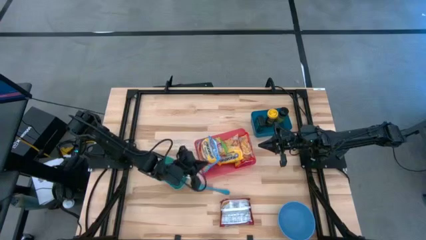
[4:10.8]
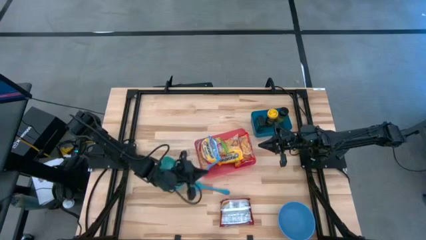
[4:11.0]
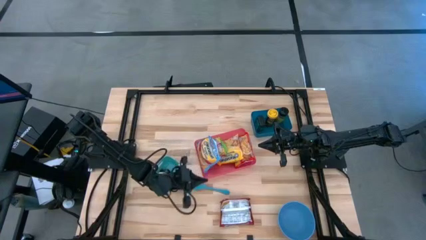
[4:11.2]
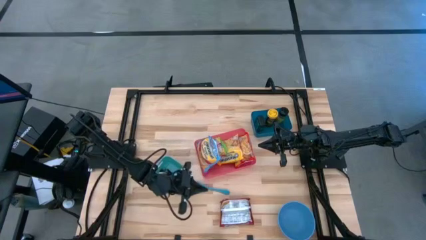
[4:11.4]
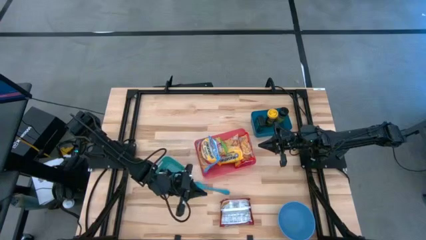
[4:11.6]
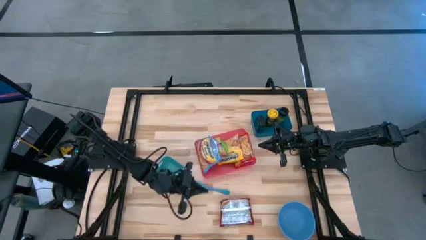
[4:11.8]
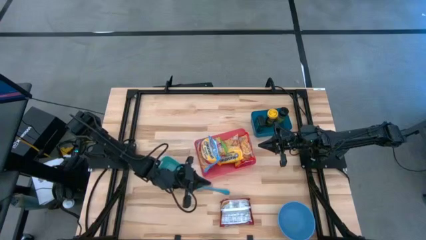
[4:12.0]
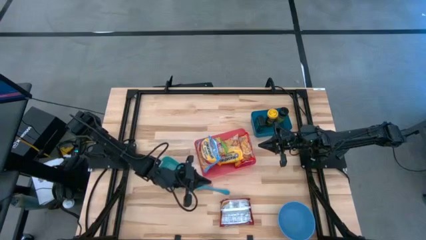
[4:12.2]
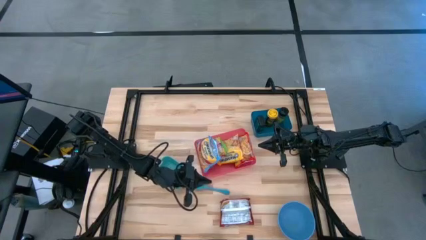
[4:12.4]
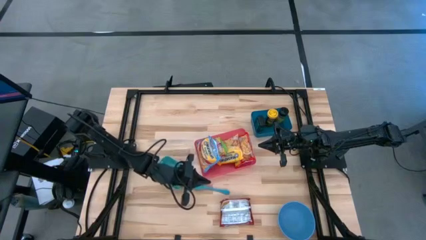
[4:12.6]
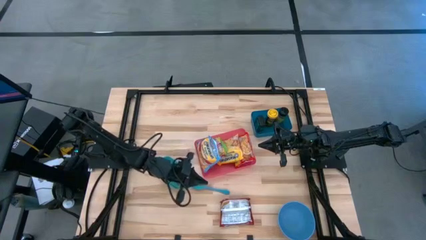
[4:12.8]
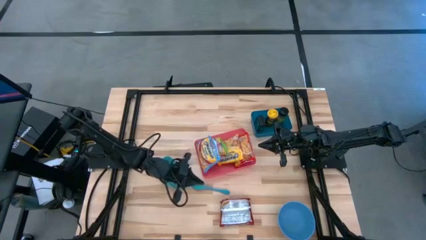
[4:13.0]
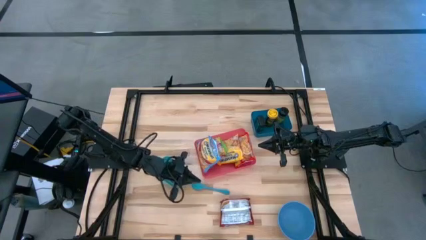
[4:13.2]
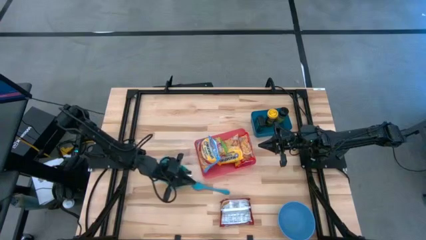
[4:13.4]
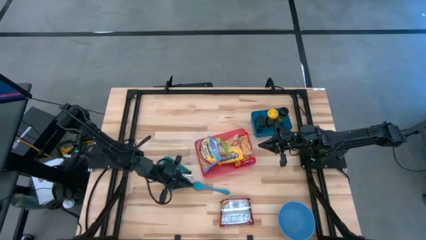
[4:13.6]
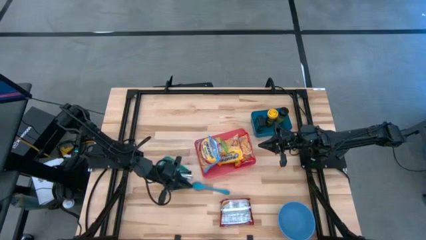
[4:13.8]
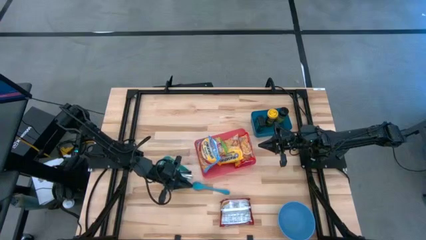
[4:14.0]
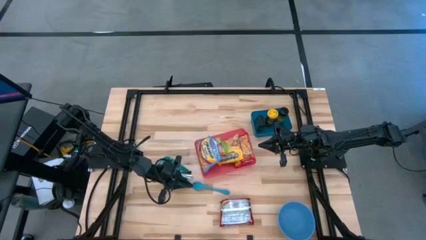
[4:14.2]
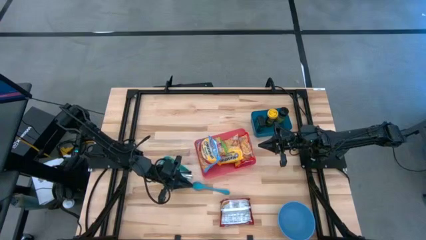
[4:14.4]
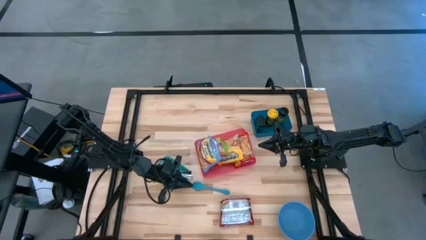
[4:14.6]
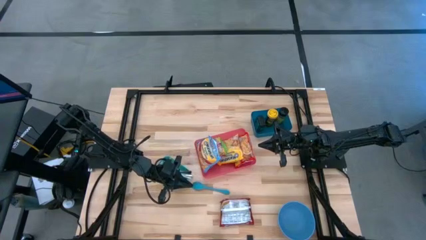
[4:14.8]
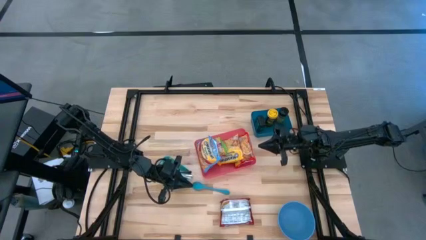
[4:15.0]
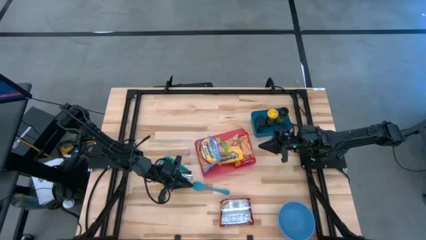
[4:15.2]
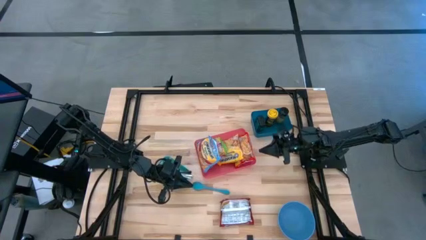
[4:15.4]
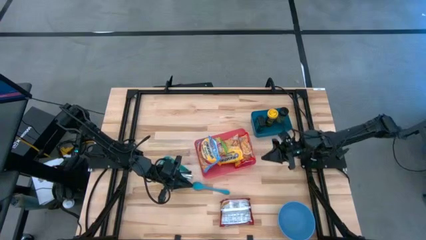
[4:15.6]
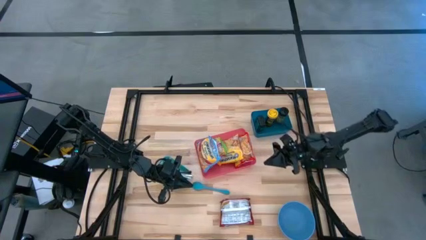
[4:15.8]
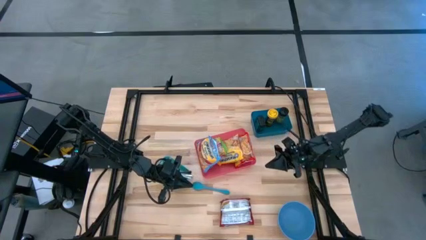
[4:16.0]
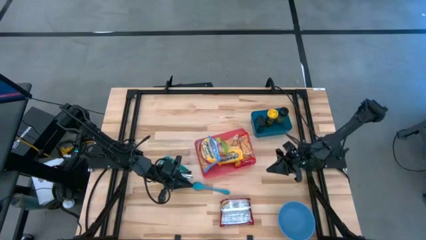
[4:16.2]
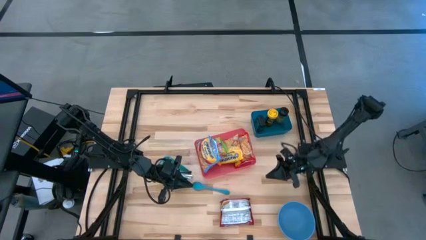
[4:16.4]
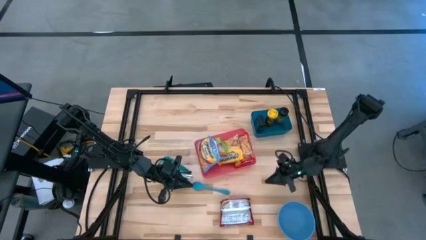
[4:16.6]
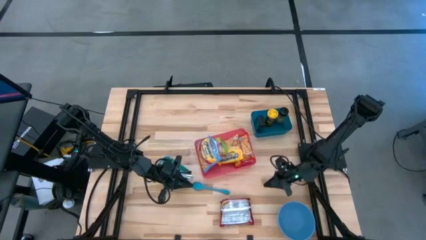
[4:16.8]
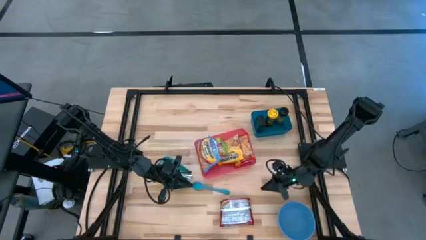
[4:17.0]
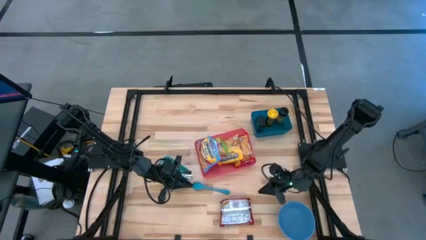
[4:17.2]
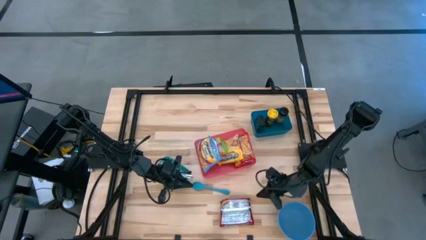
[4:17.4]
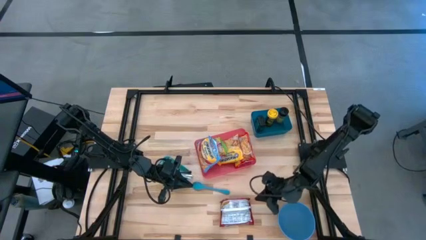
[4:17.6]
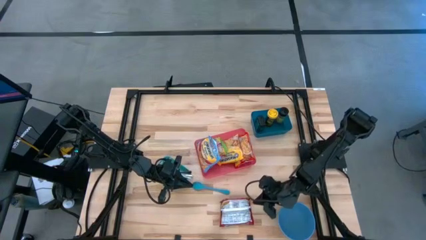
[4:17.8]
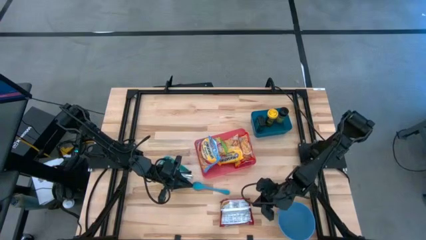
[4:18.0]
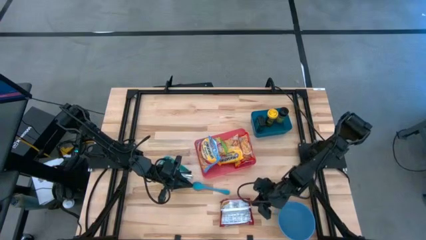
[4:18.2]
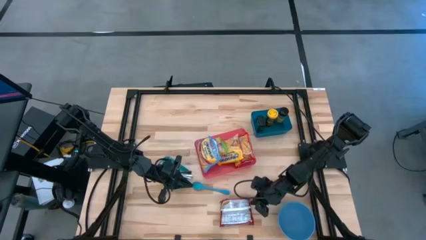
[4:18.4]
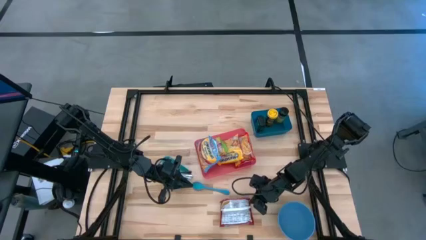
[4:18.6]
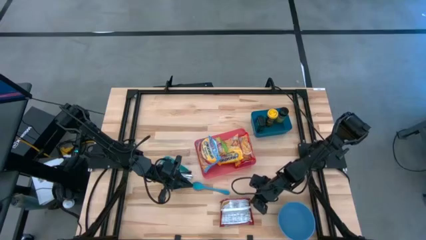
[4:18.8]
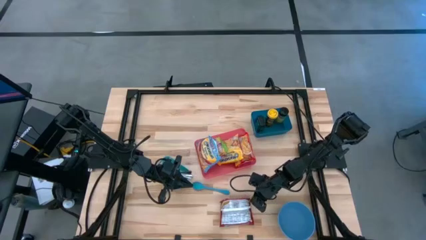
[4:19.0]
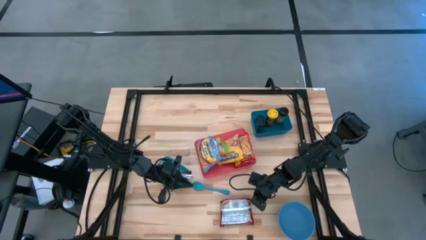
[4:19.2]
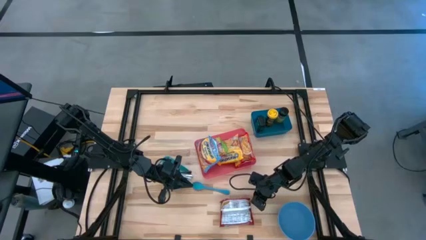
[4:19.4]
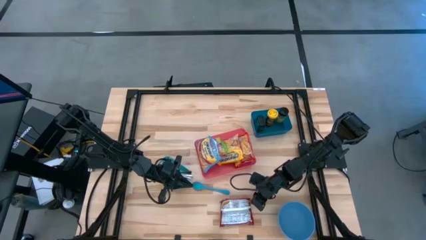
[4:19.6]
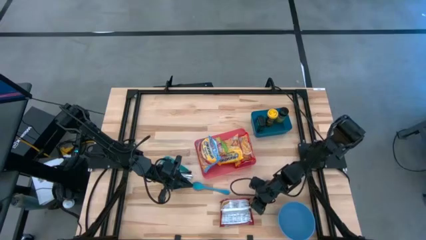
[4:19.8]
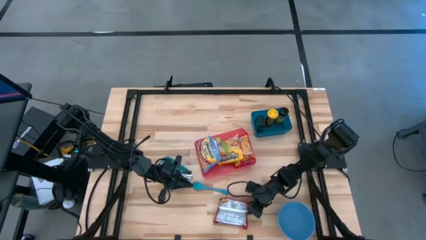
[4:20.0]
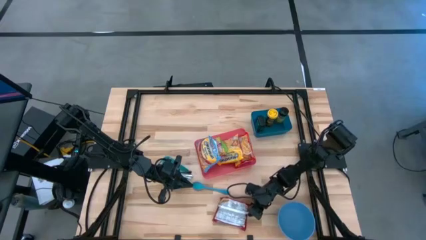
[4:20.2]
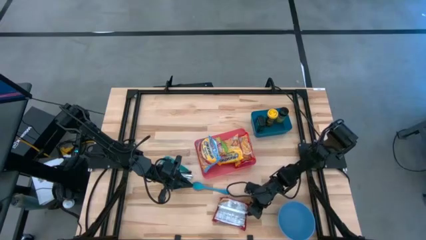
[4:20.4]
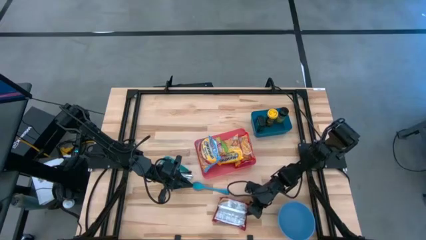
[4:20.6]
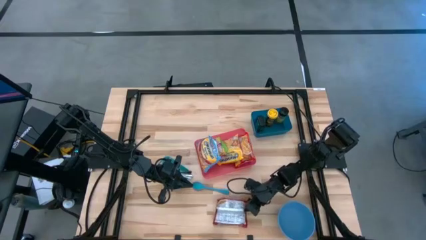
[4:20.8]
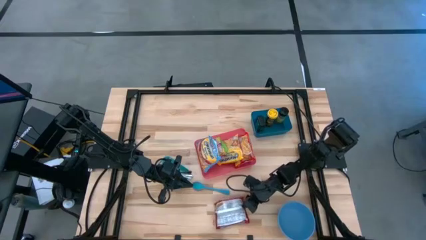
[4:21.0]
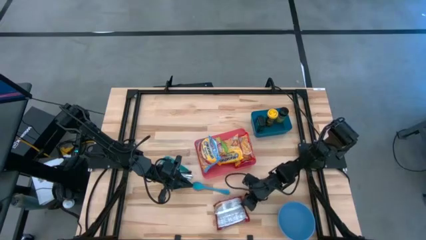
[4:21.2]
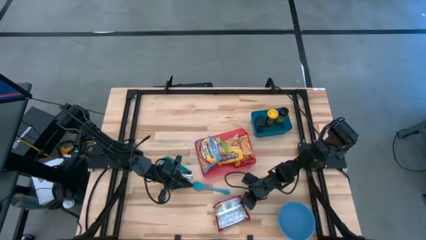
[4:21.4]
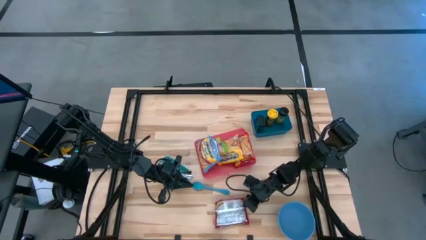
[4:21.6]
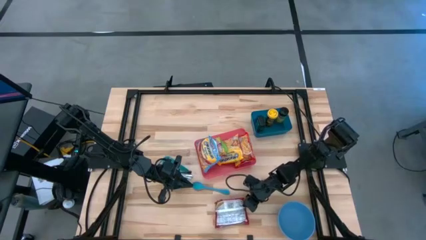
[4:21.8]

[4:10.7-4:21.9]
Task: Pick & Place Food Item
Put the red noodle pack into the red bin

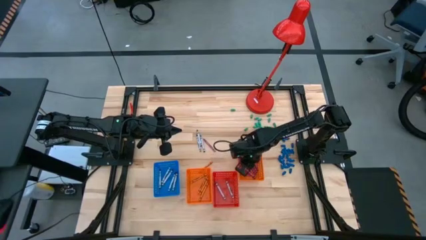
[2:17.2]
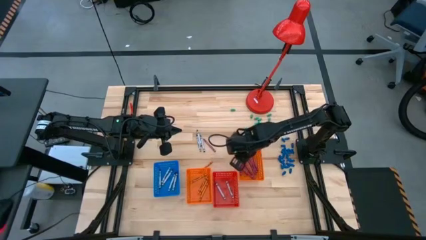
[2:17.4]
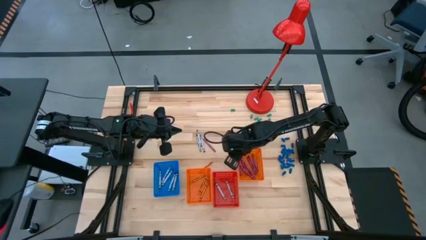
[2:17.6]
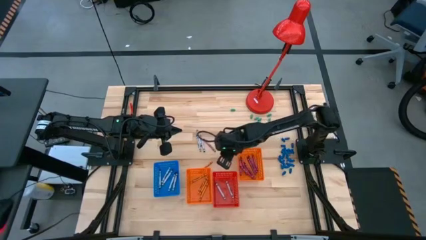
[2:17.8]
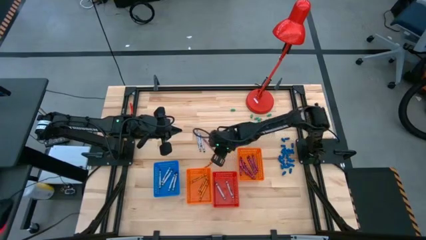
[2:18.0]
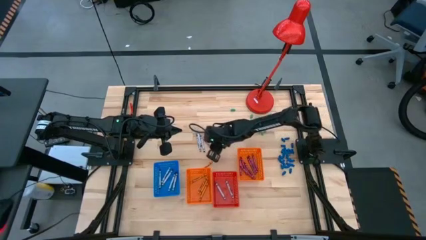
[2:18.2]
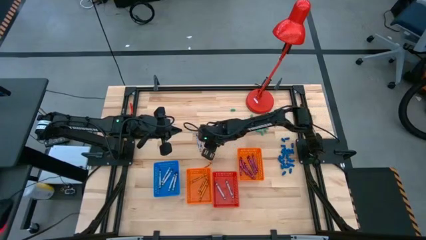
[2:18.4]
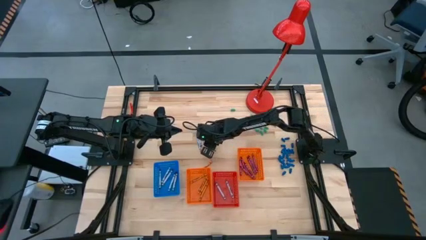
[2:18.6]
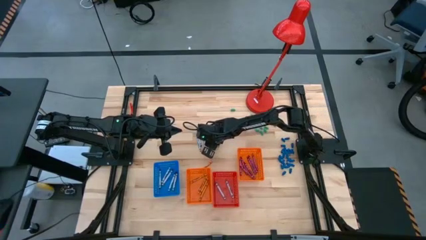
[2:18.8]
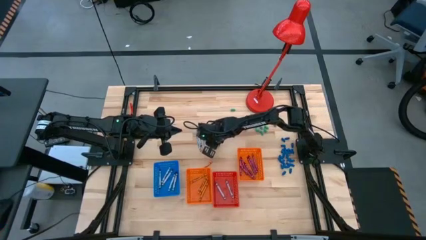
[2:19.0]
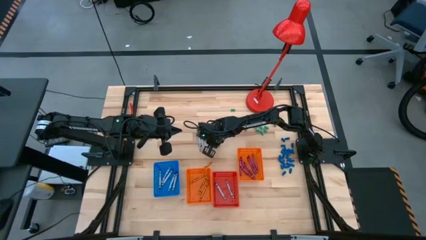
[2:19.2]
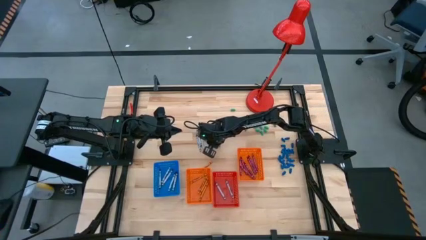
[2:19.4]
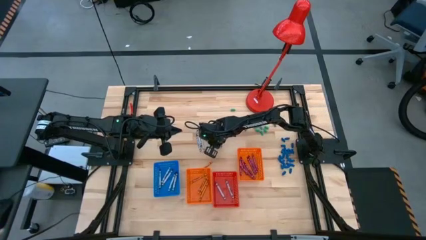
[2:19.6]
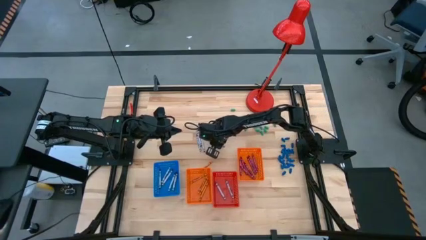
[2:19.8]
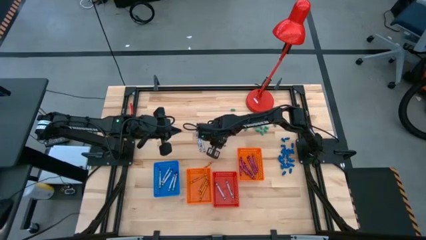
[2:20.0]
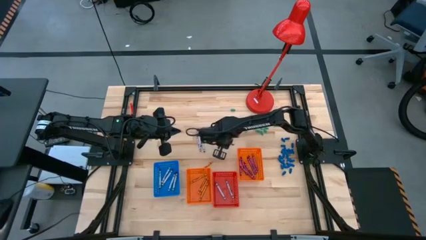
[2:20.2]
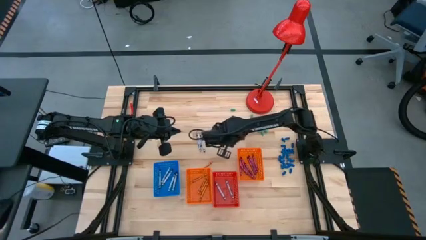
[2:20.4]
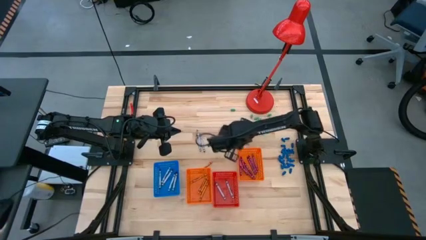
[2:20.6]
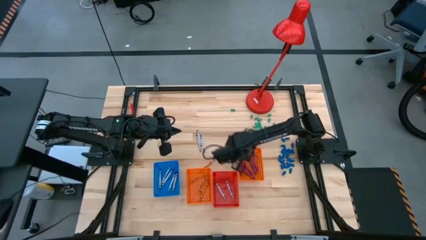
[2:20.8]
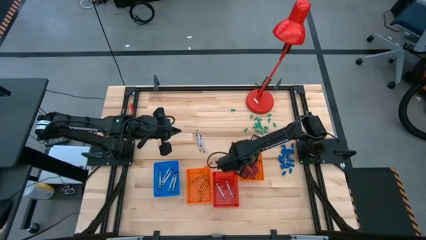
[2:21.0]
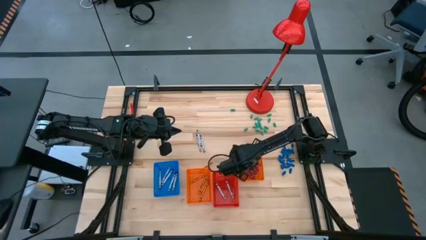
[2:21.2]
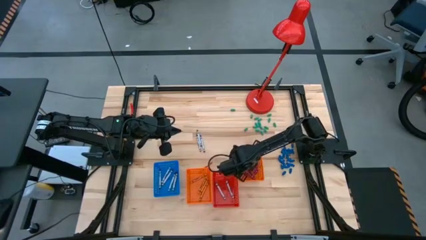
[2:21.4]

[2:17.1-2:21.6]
Task: Sort crayons
Put the red crayon into the right orange bin
